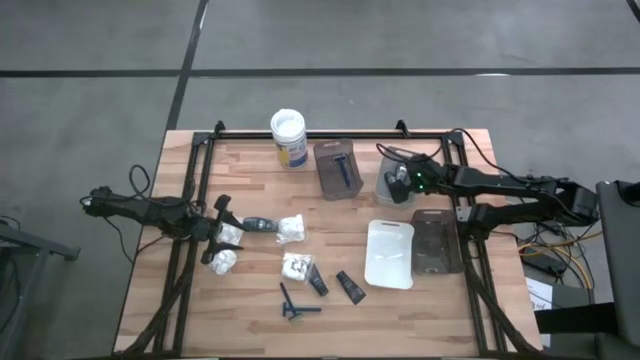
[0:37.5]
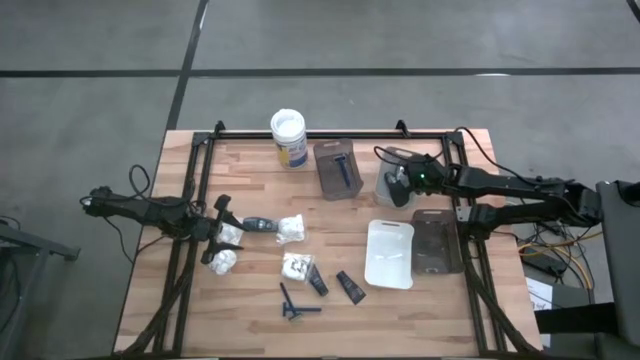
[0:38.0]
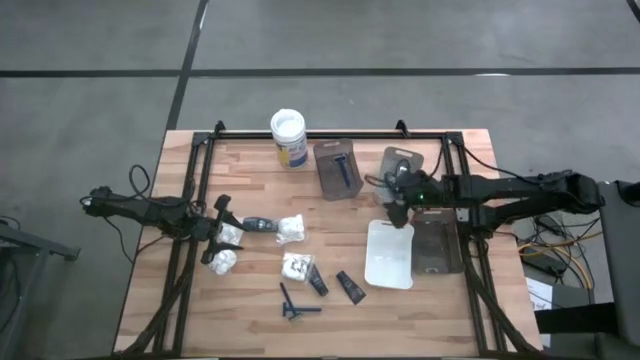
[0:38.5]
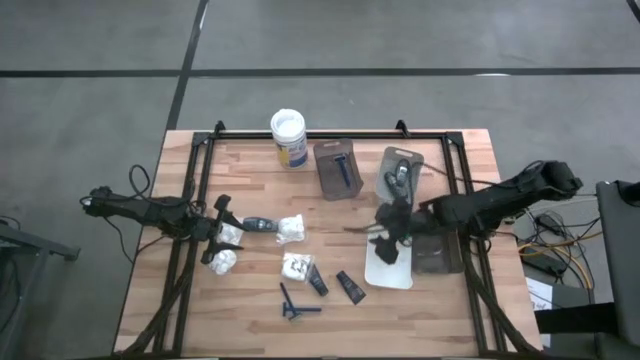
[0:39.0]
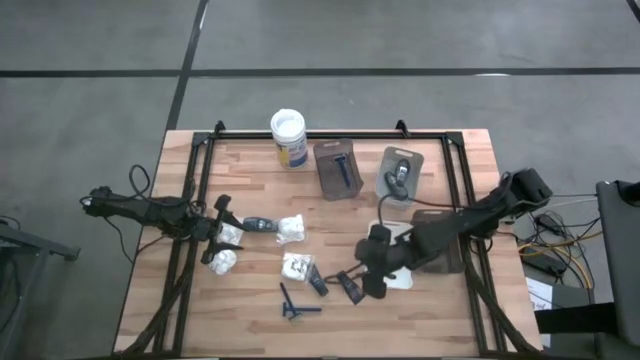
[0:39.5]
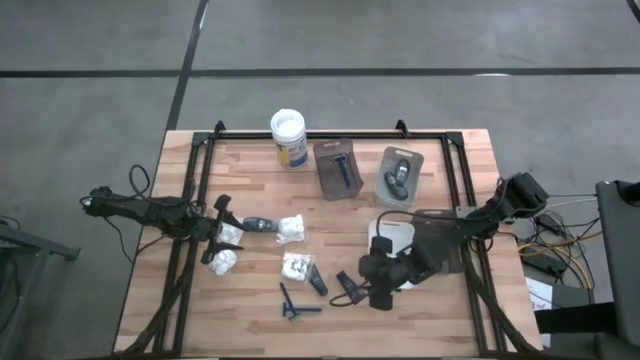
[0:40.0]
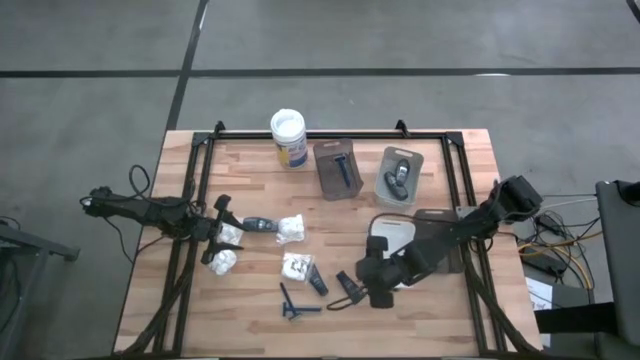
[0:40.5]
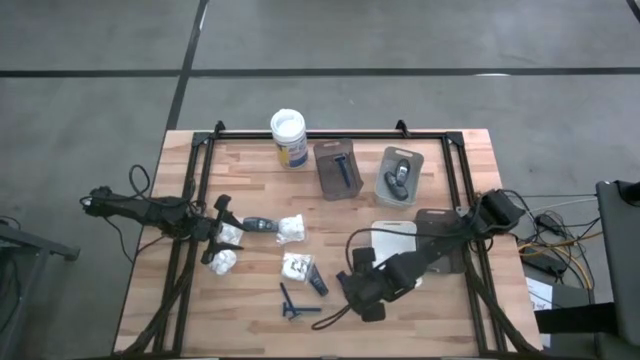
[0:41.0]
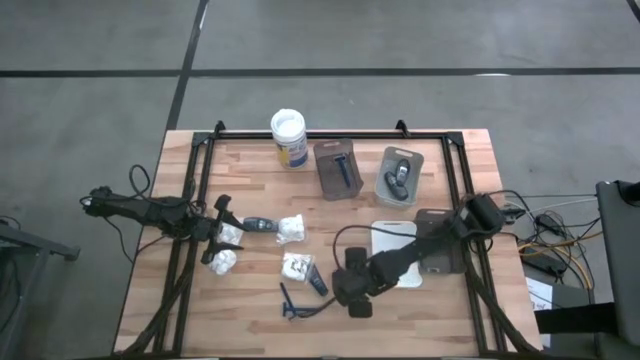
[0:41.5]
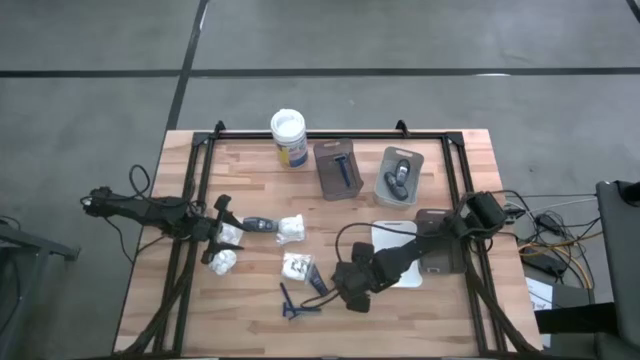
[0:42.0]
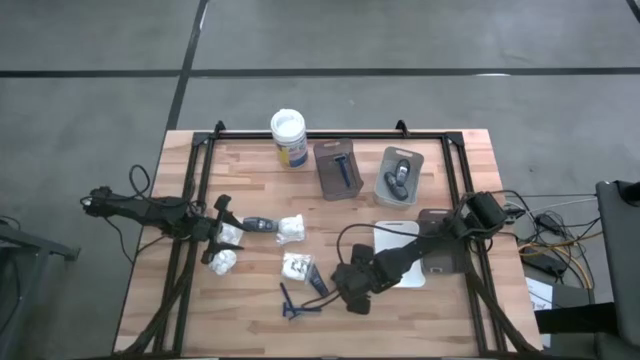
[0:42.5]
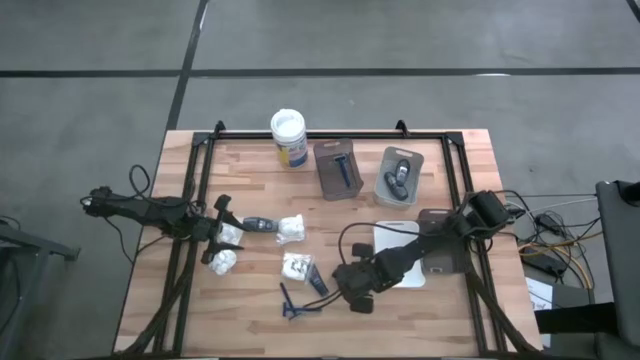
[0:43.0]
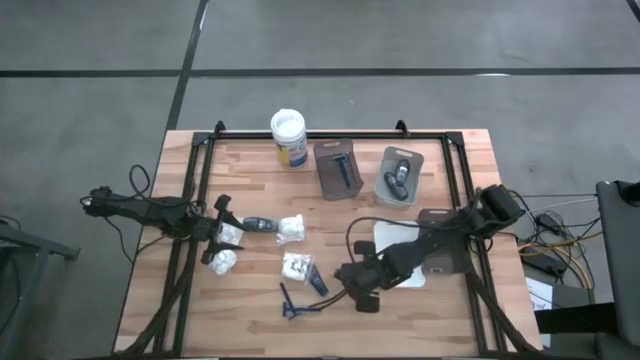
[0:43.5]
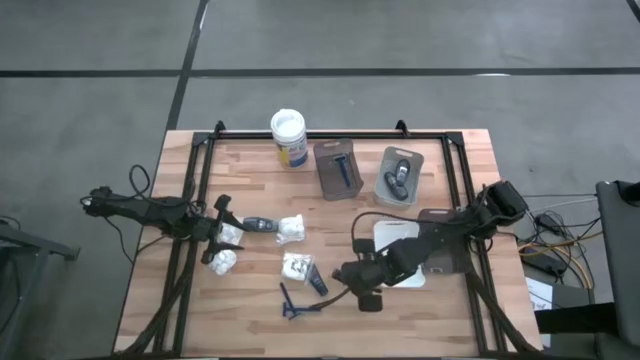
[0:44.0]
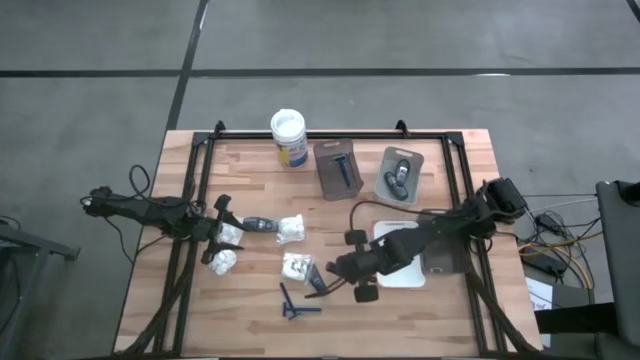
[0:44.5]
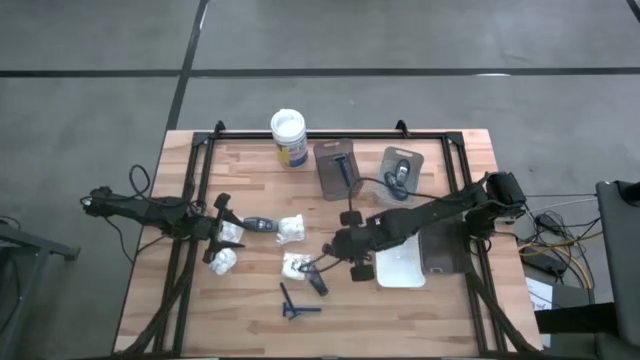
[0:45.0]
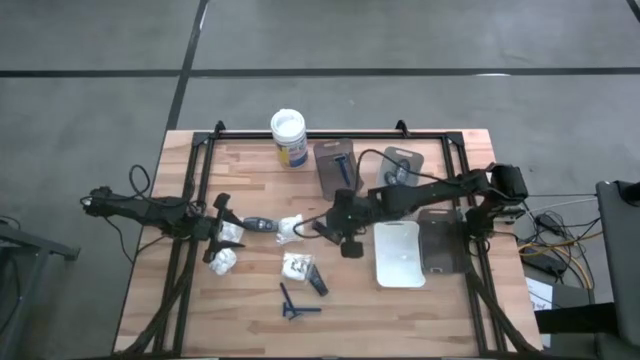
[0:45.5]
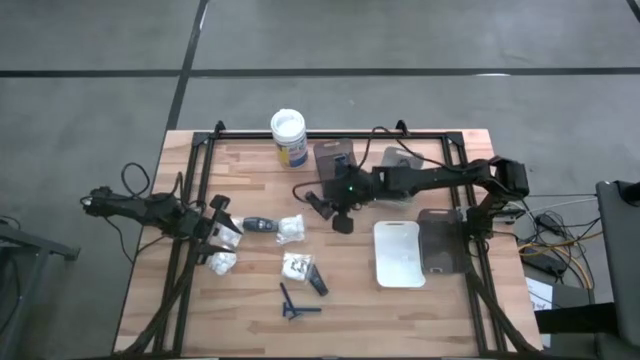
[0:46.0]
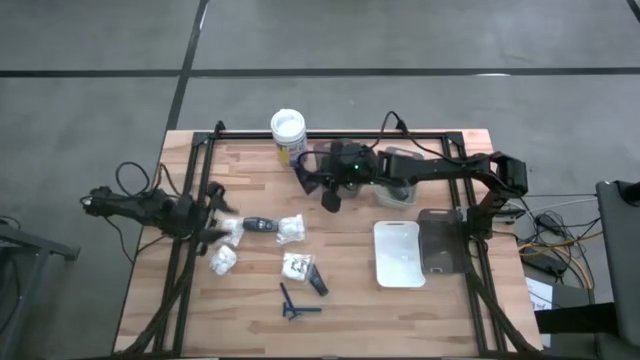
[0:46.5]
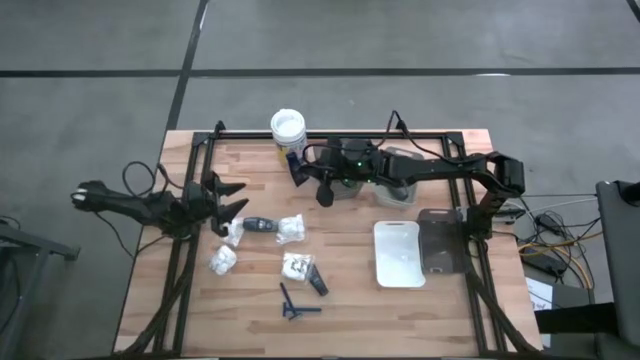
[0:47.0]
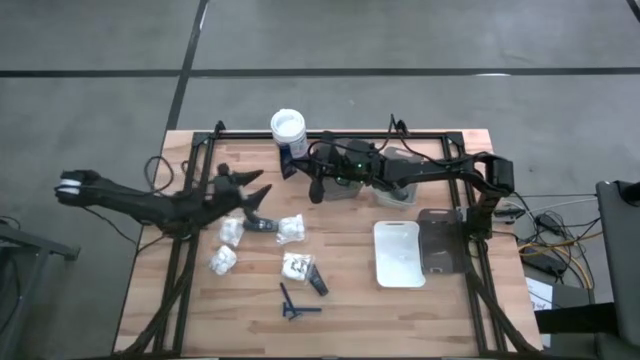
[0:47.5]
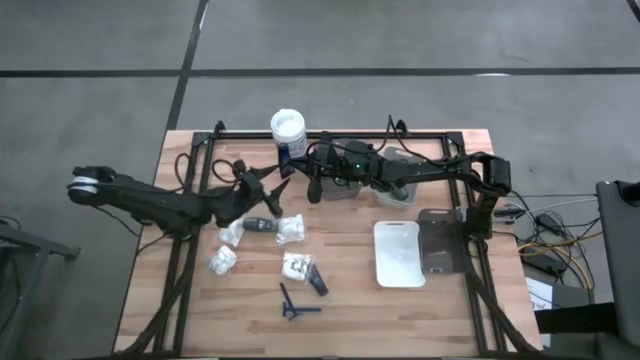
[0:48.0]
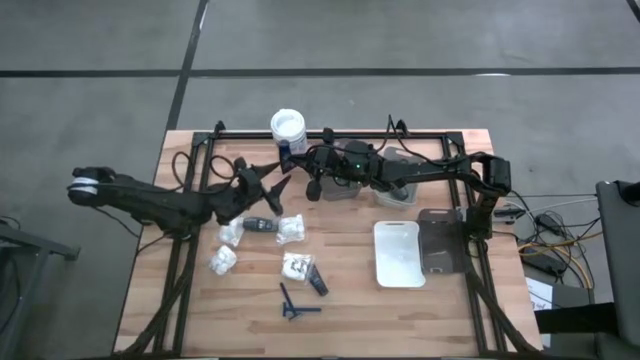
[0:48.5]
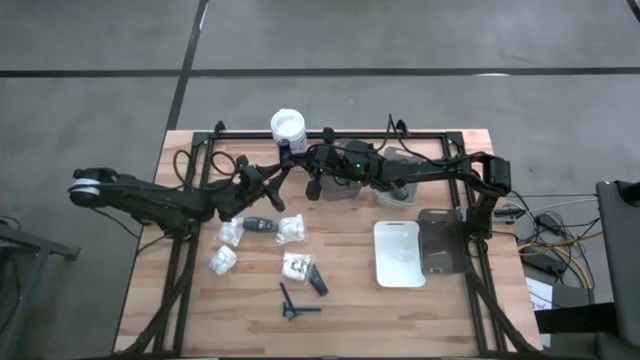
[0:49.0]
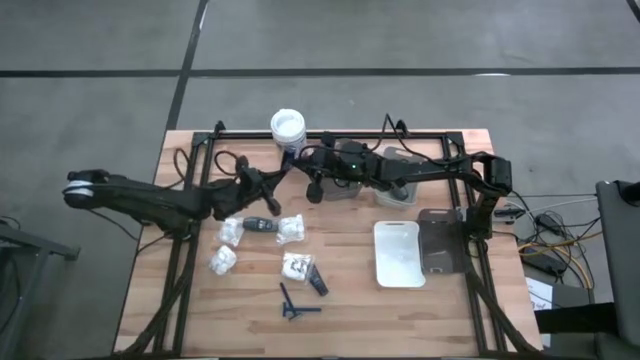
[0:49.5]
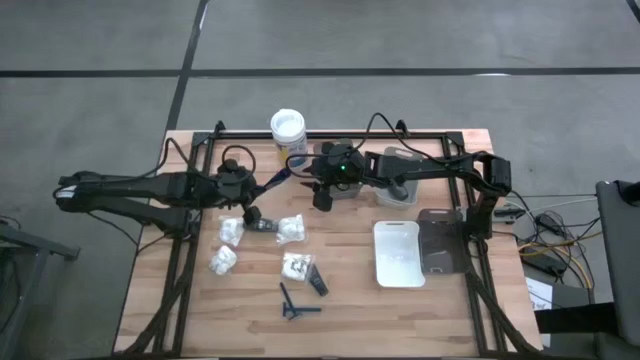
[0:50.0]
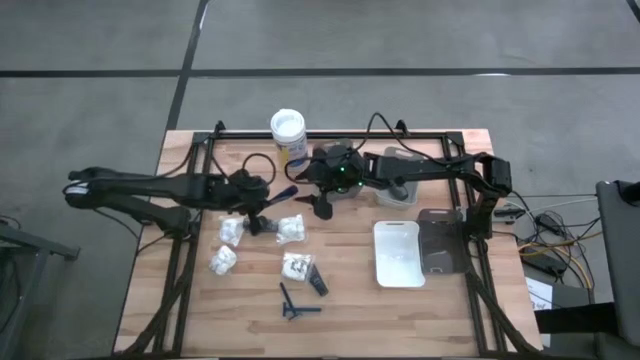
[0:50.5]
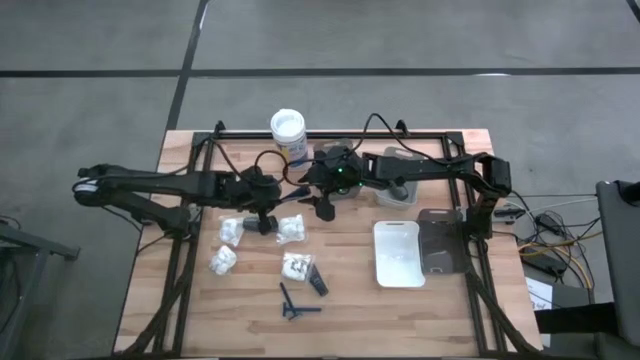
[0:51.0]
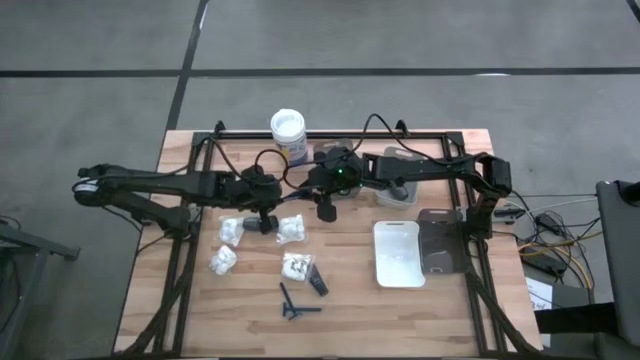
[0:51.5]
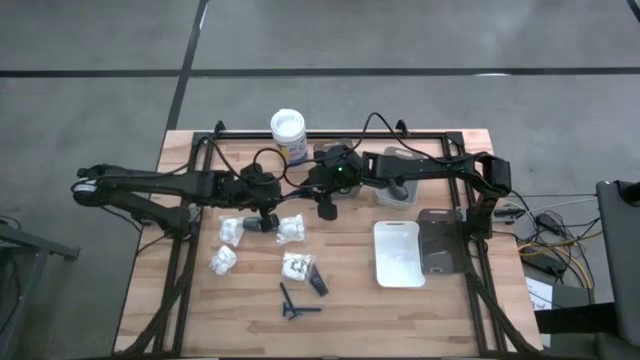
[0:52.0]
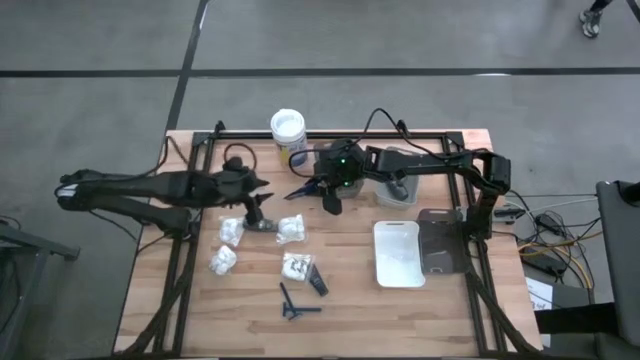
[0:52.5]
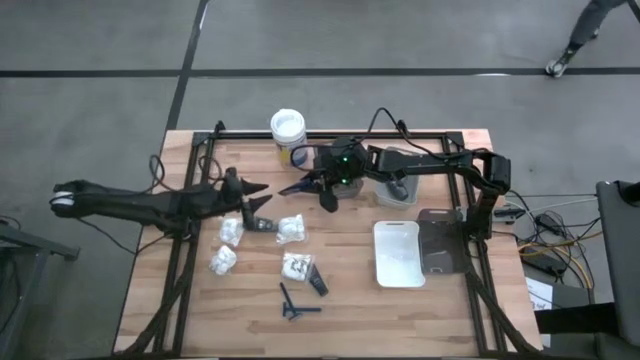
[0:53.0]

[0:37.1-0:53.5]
Task: Pick & Place Travel size toiletries
Put the blue shaving cream into the white bin

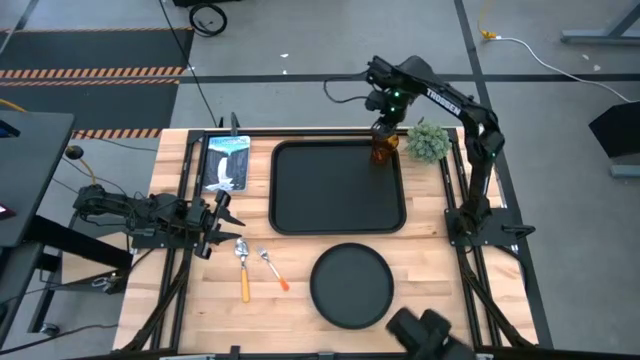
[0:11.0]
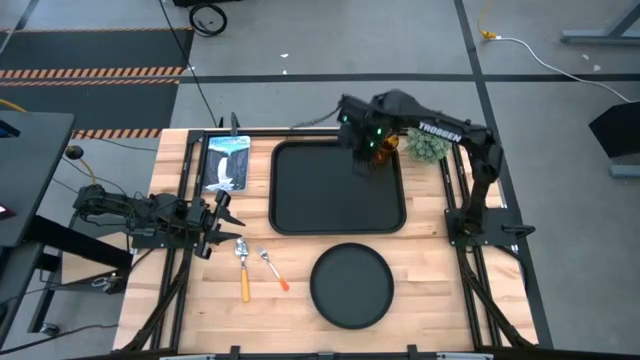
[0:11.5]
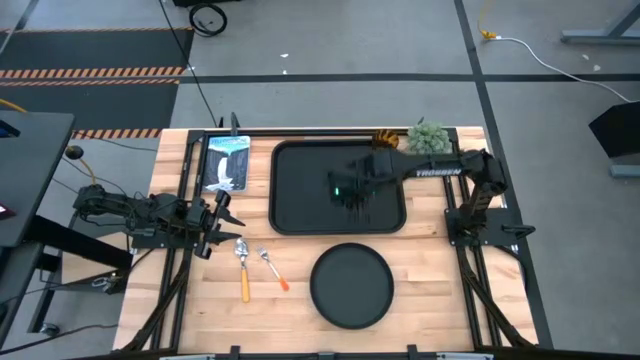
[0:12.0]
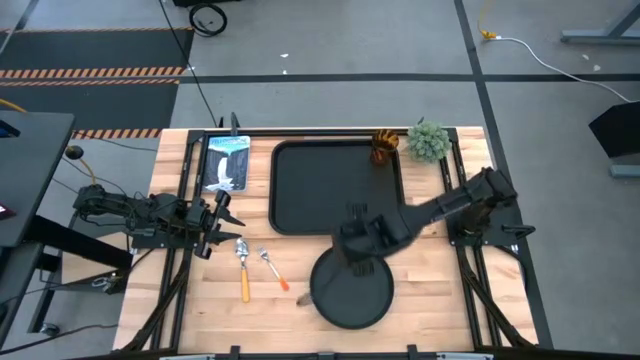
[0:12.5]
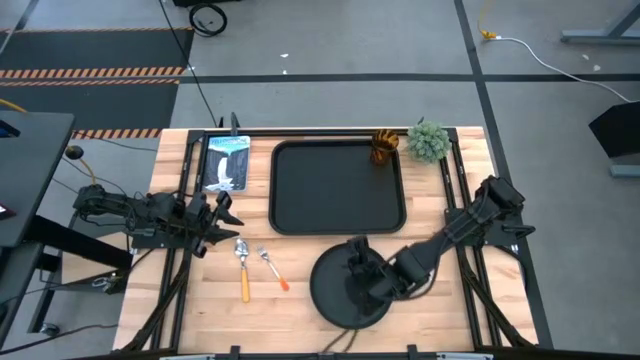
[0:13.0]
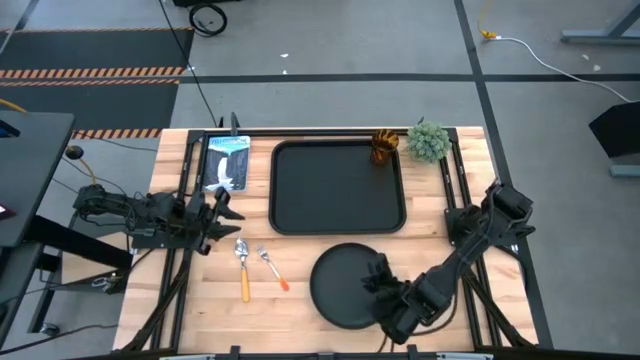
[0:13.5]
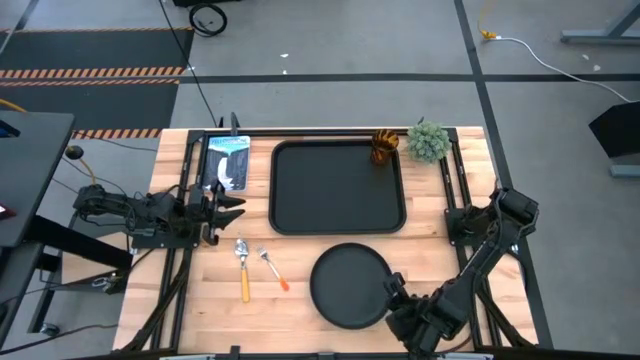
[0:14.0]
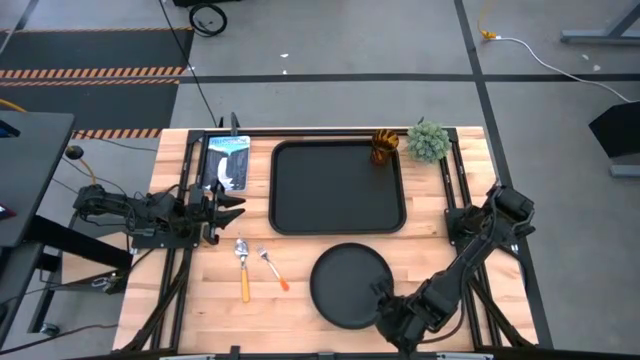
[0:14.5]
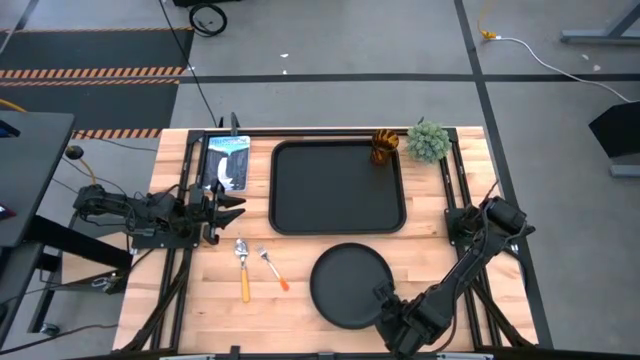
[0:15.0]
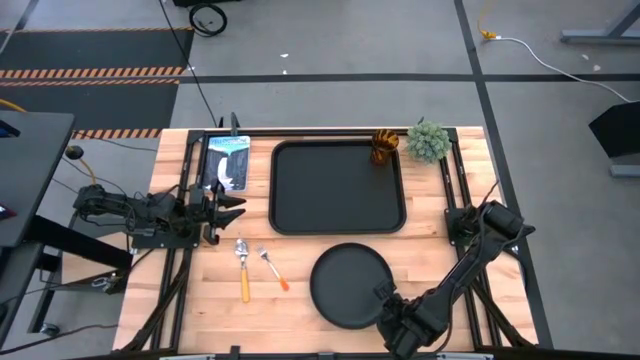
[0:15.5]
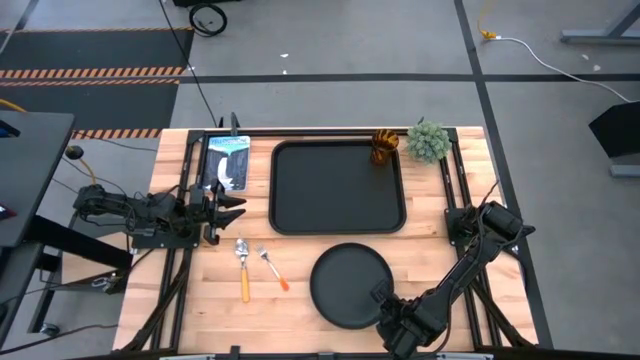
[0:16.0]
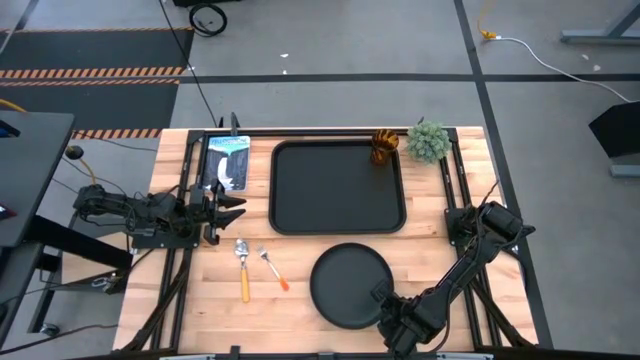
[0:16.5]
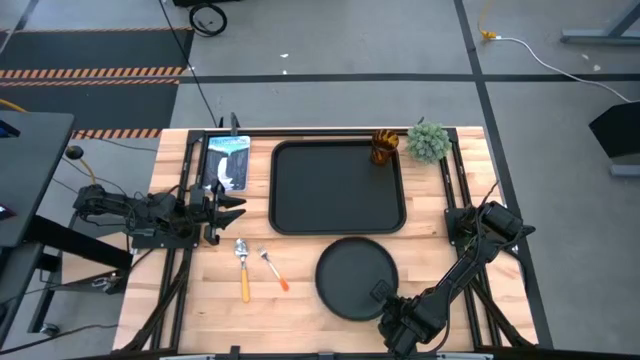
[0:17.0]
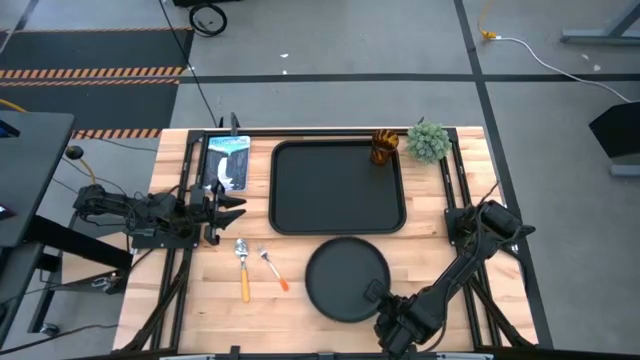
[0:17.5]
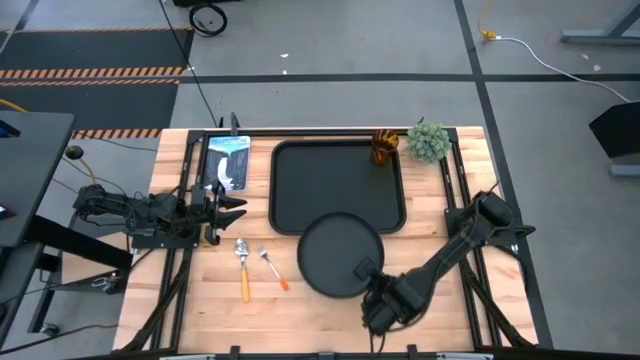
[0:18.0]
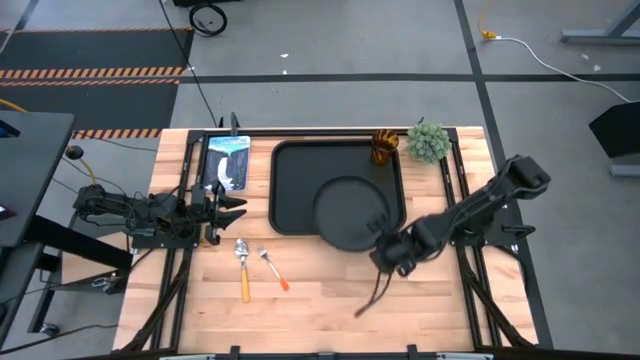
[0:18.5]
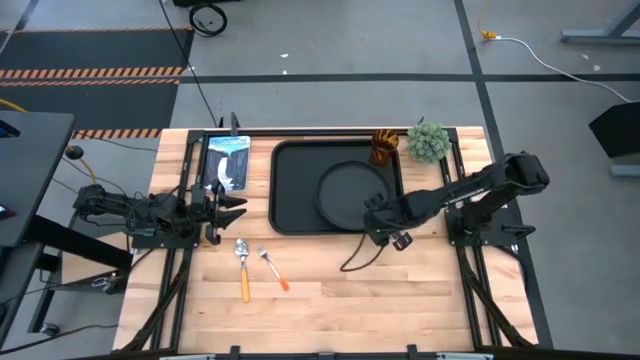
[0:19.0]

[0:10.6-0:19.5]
Task: Pick and place plate/cup/fork/spoon on tray
Put the black plate on the black tray
